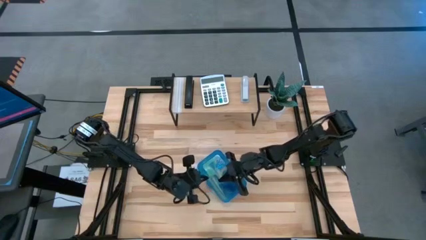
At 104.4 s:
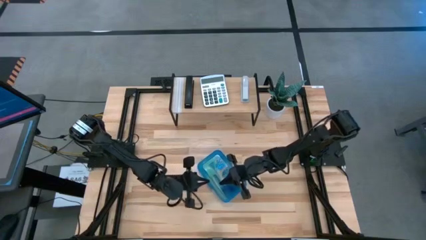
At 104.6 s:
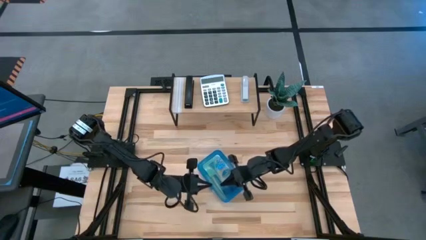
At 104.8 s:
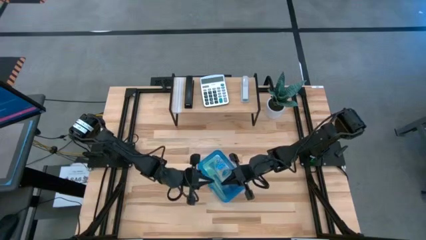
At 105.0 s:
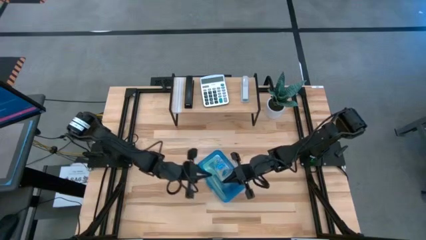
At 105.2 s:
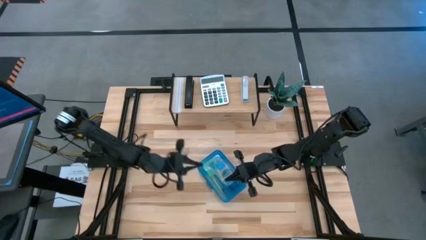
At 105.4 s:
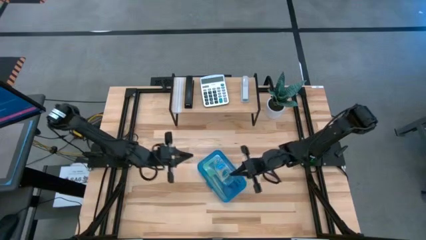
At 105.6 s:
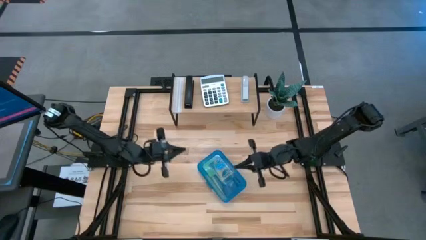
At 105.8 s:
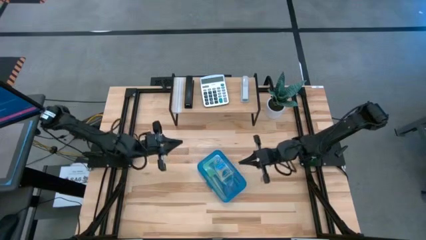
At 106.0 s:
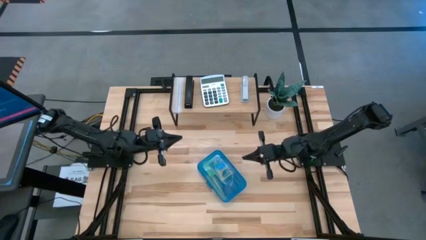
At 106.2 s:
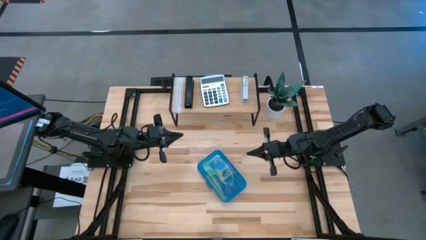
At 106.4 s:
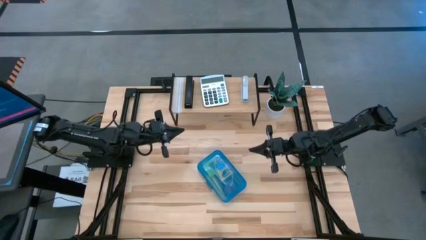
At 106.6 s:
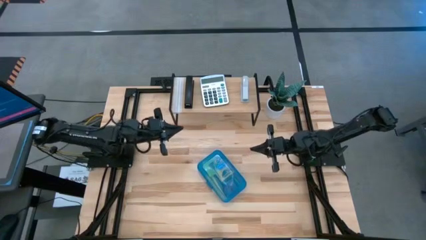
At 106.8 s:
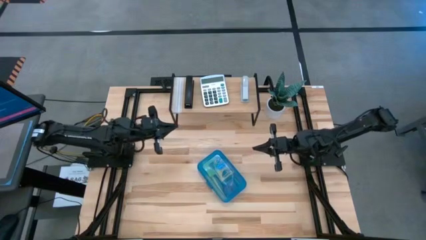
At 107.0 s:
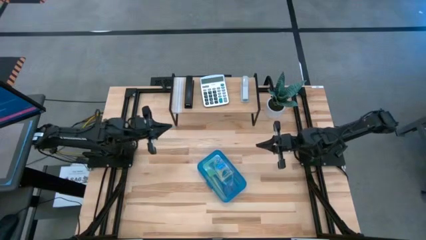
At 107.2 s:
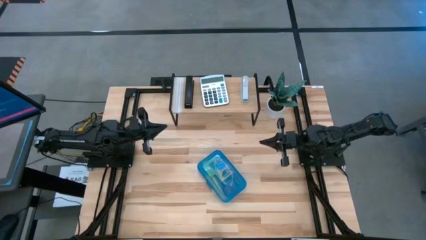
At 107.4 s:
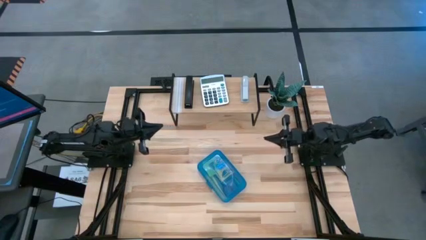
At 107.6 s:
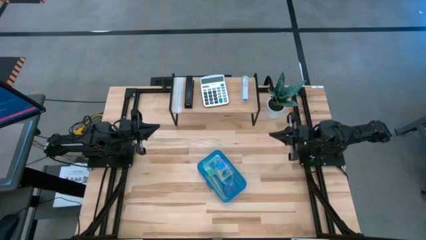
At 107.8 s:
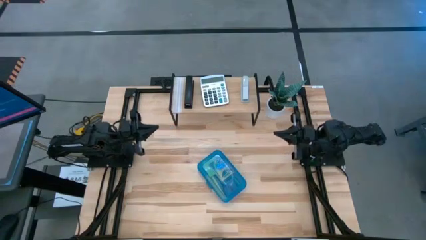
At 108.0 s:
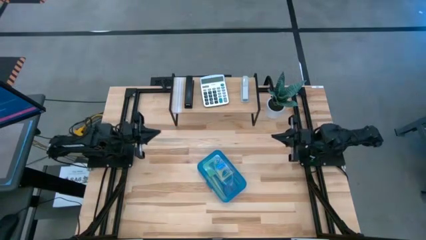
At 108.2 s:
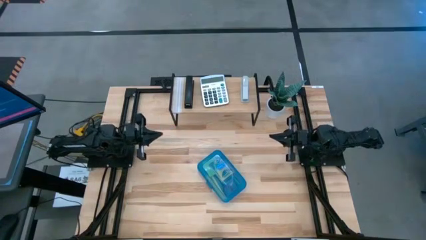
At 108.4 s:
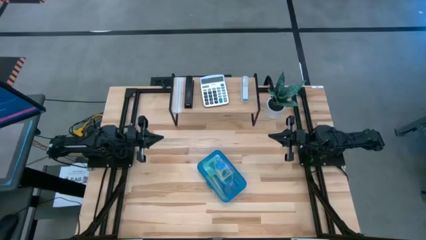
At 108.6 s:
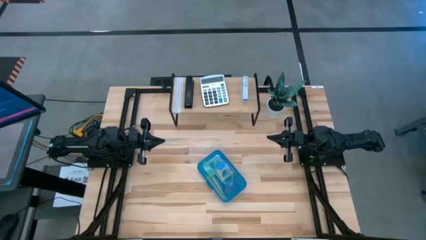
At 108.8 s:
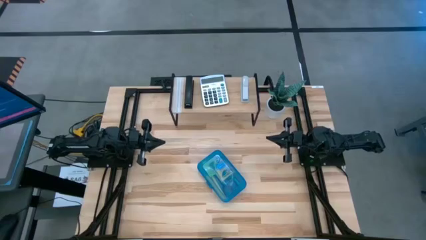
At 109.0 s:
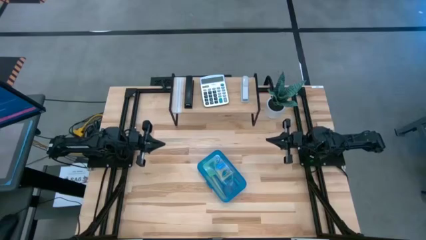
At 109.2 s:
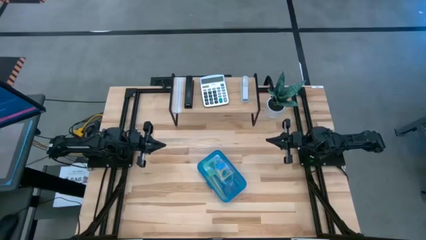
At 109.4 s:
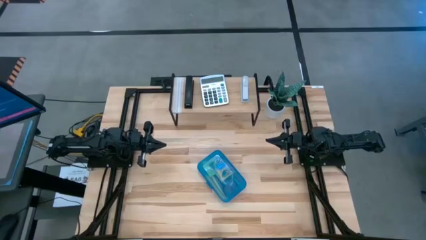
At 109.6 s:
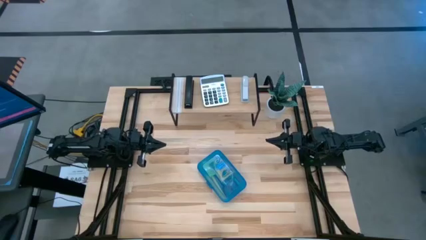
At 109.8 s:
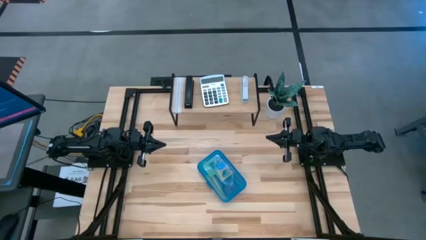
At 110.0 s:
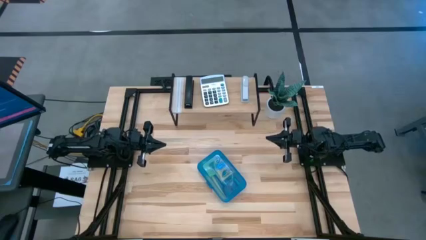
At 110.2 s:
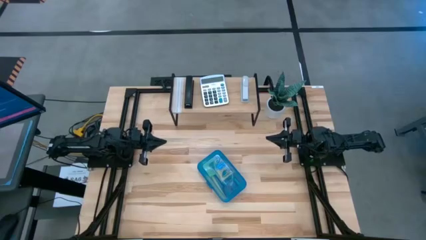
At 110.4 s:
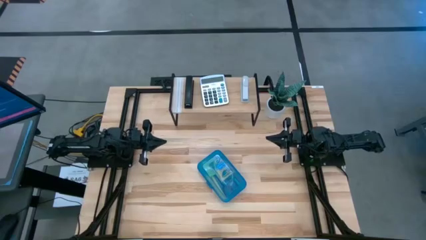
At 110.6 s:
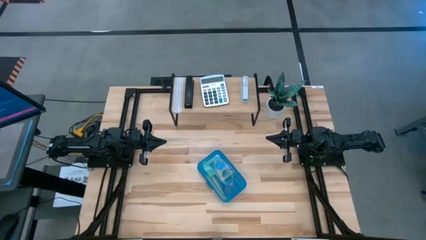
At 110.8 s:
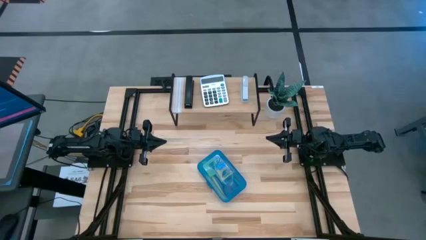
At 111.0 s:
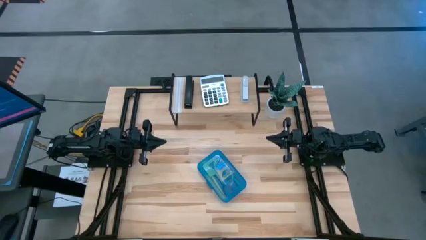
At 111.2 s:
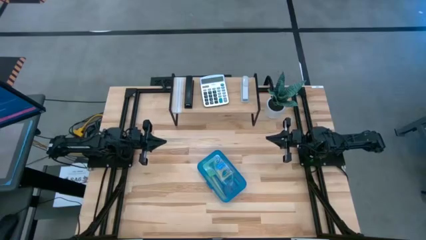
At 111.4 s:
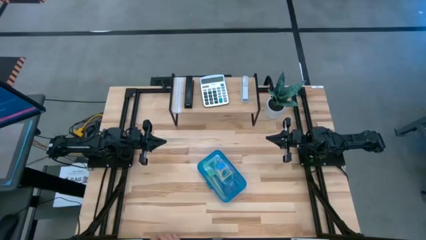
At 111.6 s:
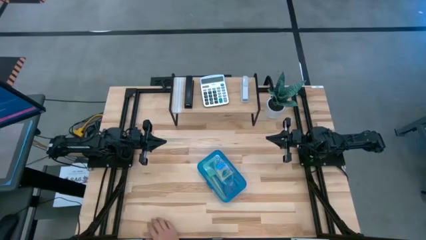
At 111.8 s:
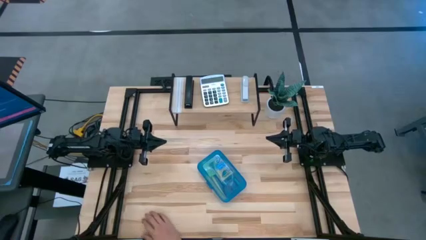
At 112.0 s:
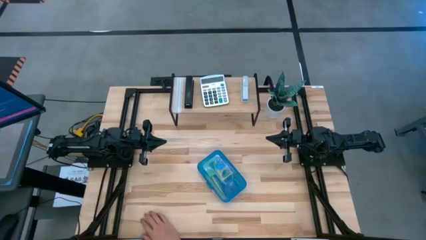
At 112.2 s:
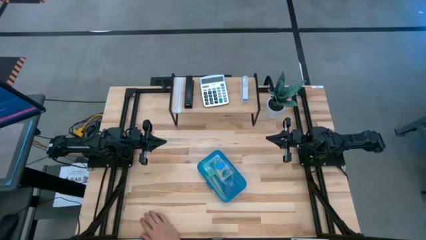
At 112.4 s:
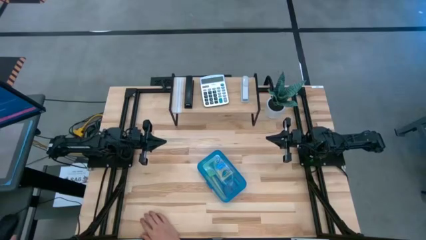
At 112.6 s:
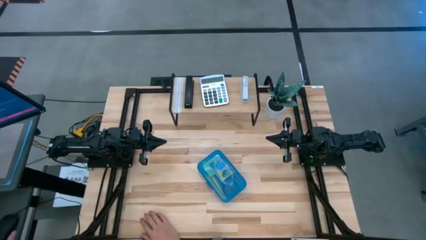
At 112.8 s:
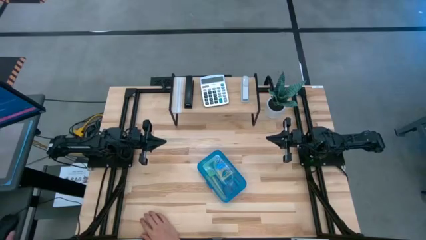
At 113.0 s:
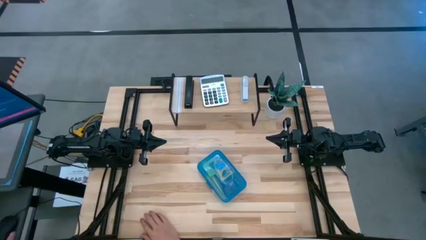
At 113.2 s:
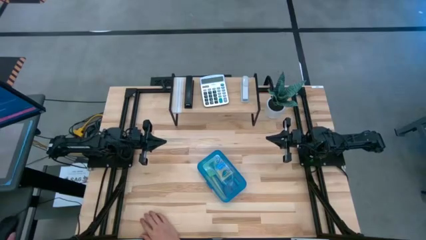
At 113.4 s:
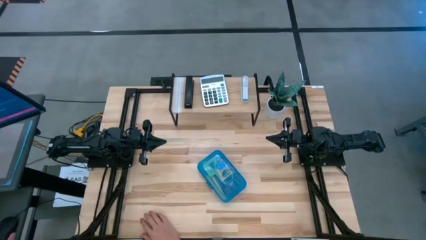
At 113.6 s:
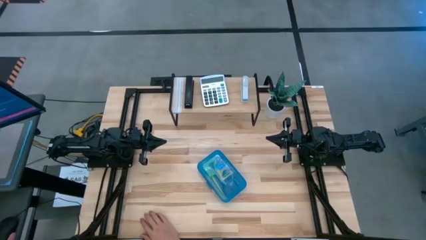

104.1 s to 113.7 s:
Task: Pack school essentials
Return to Home Position

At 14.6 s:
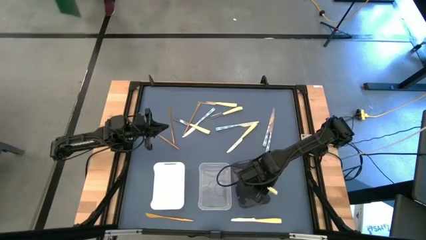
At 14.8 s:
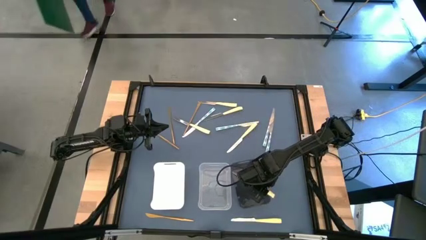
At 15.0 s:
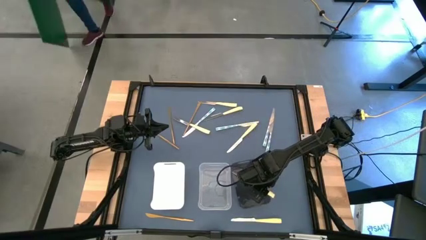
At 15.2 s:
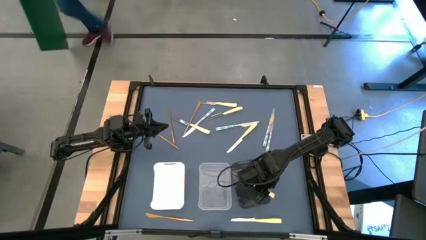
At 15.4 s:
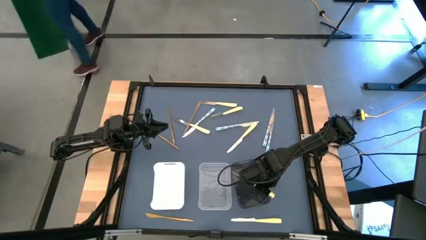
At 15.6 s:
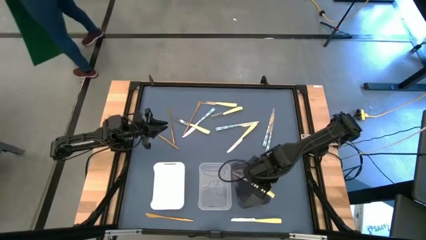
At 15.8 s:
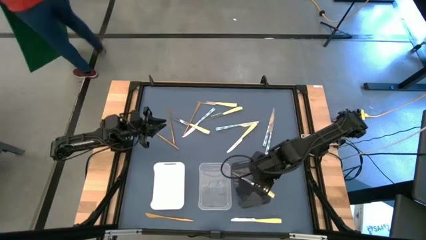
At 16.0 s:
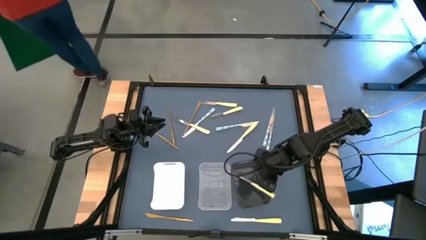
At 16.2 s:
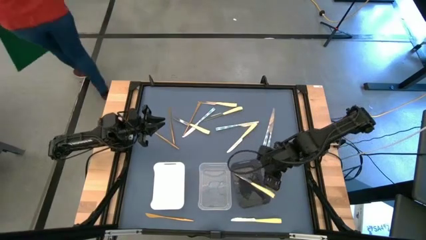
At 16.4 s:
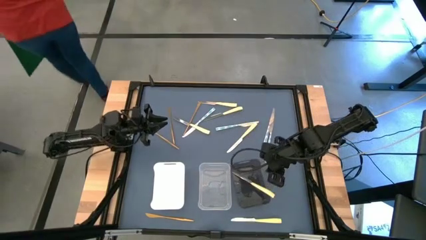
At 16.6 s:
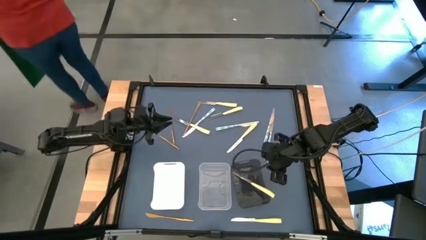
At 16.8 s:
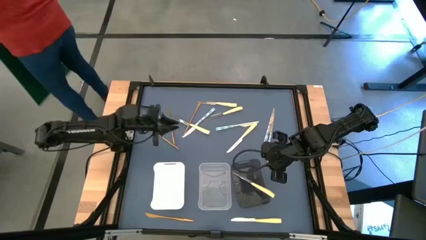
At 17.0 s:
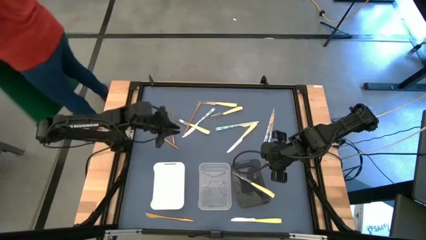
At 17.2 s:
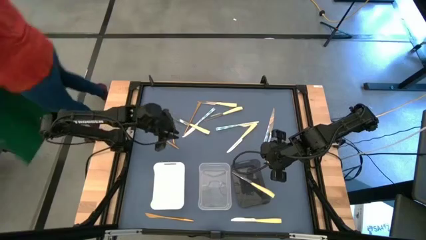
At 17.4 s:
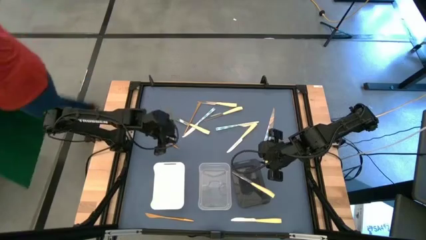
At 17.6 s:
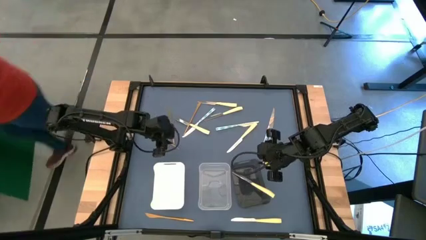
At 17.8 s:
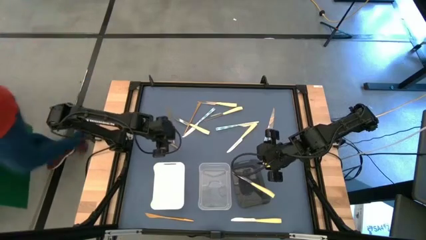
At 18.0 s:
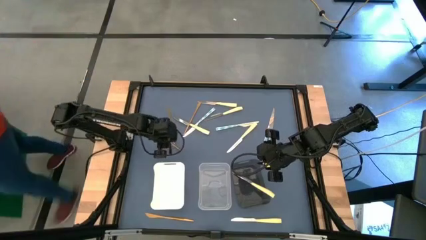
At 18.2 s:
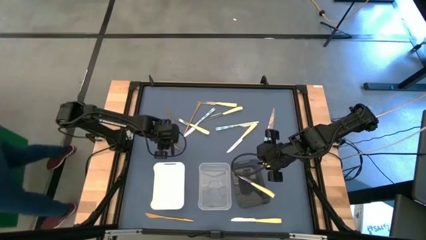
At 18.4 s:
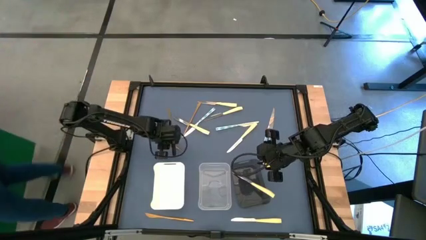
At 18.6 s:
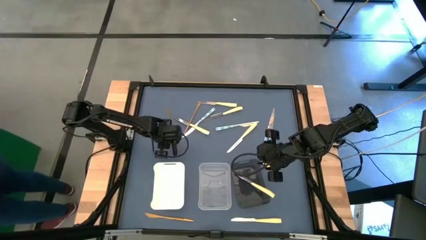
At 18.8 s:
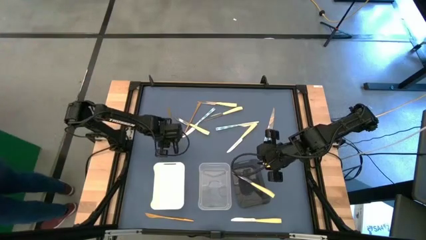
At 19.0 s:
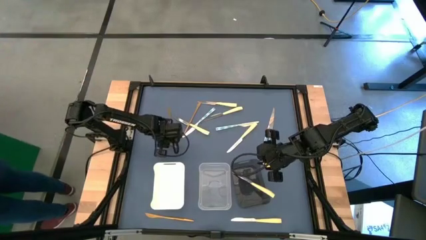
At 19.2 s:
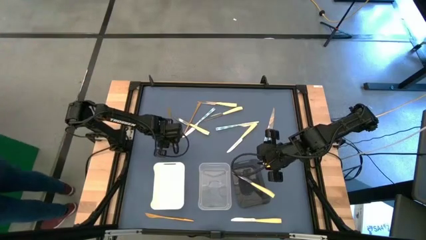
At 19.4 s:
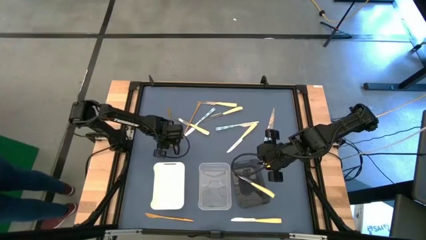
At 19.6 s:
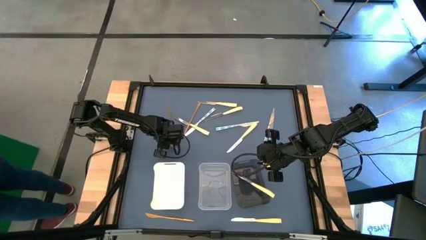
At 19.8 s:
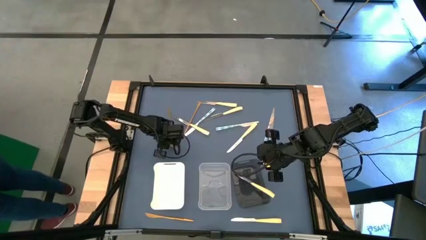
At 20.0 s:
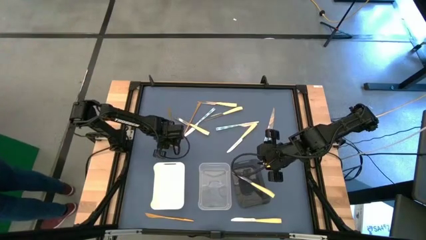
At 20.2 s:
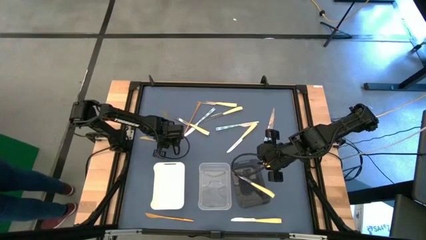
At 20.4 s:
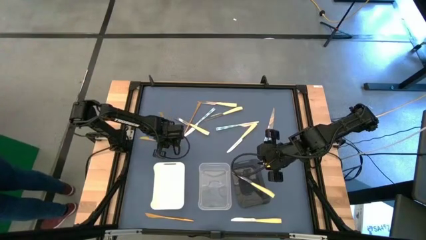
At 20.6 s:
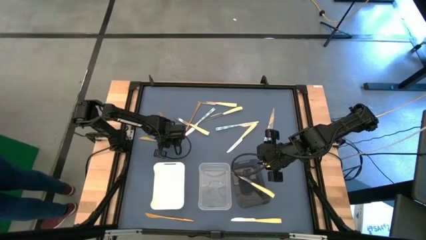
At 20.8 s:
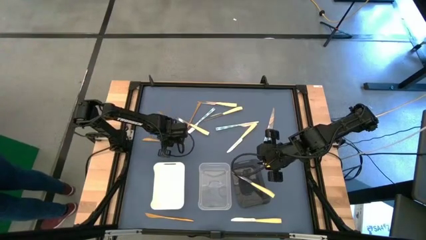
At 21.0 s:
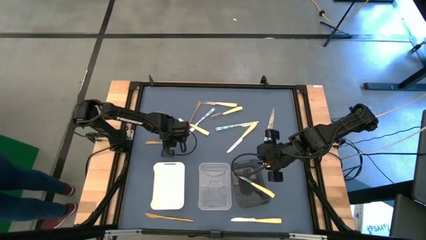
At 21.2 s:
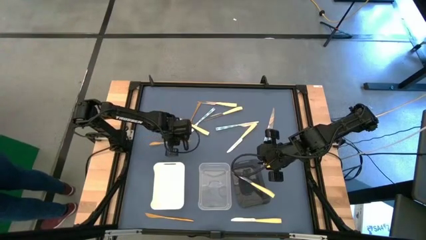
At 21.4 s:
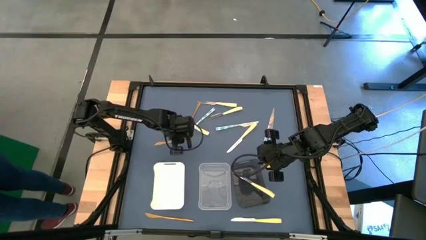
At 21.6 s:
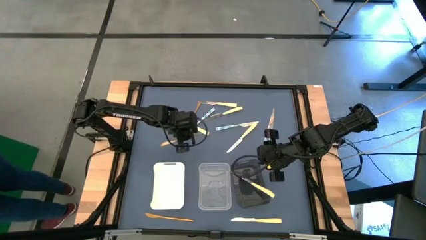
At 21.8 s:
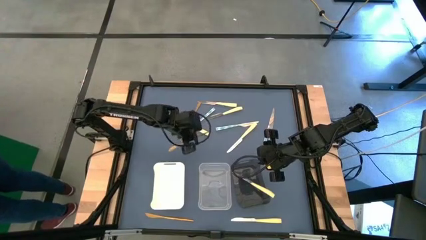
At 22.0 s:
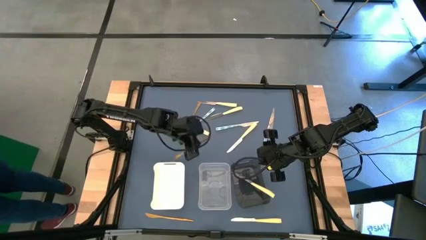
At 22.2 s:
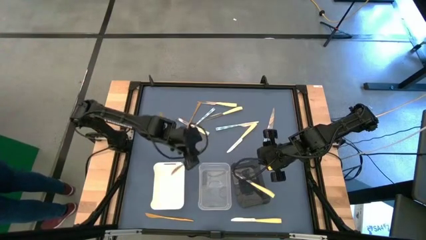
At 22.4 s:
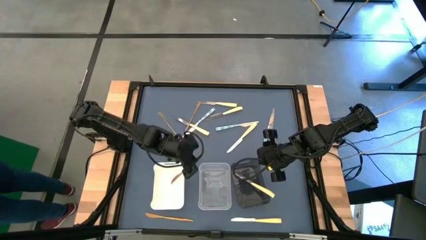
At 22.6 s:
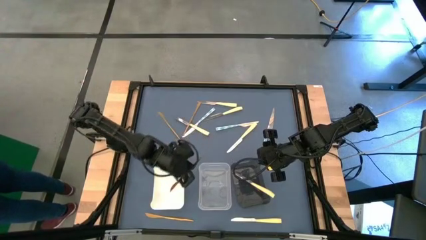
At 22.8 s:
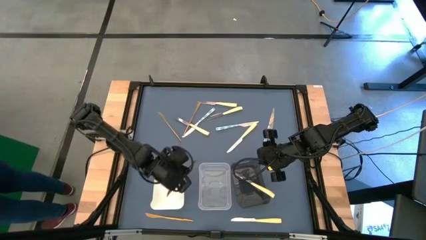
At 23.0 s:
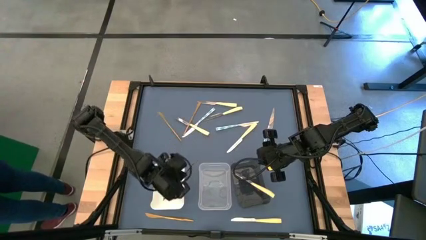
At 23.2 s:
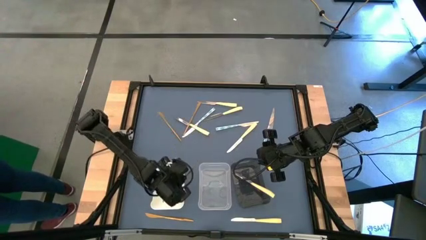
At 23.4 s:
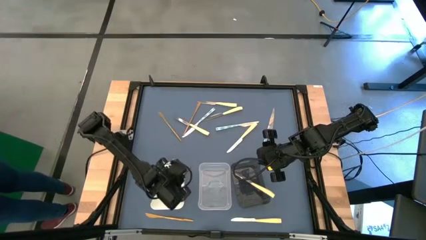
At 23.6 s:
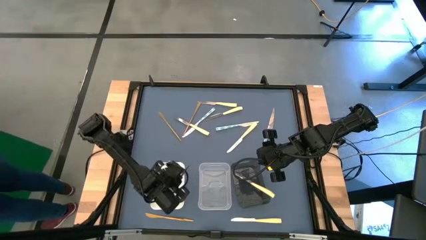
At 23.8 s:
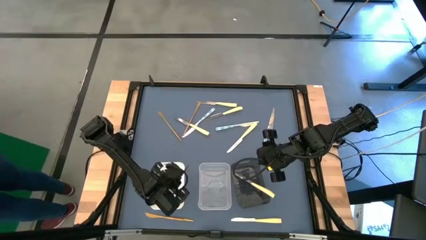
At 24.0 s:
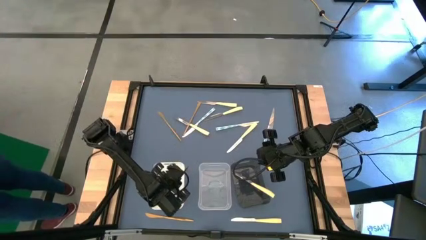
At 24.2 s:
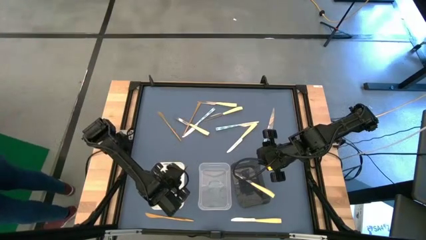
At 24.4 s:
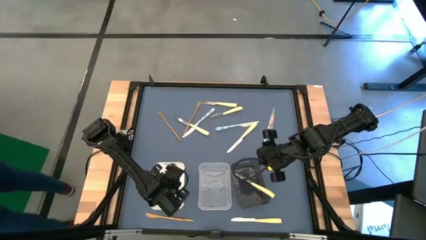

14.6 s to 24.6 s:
Task: Sort silverware by color (type)
Put the gold table knife into the white bin
